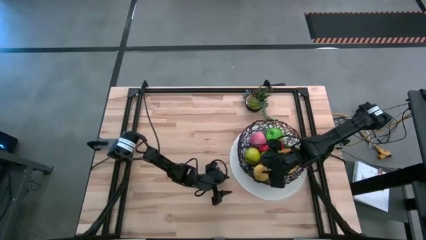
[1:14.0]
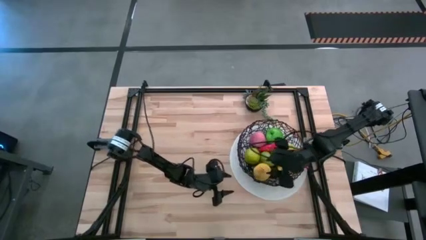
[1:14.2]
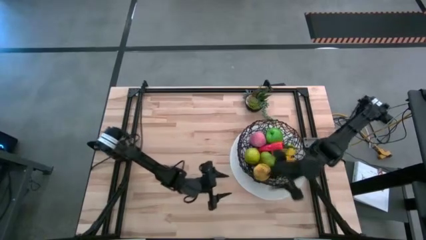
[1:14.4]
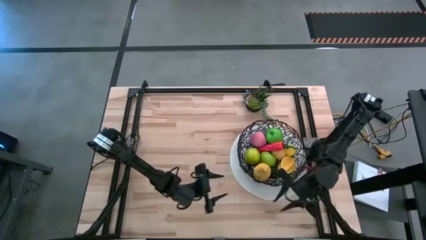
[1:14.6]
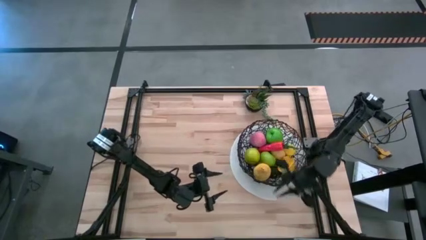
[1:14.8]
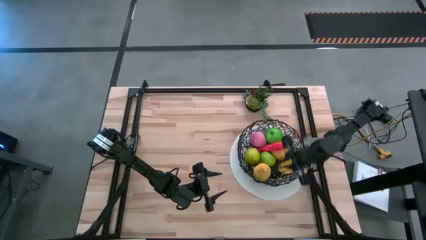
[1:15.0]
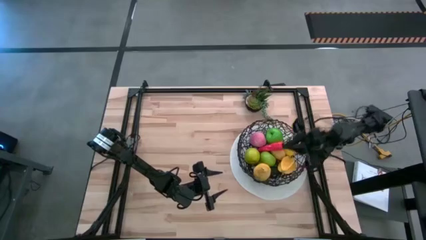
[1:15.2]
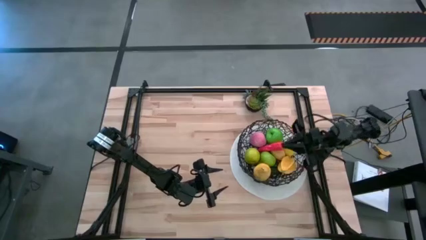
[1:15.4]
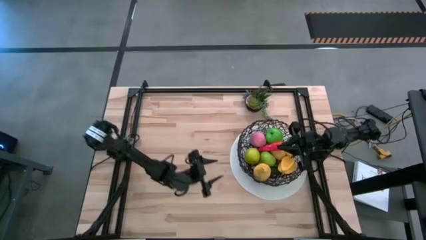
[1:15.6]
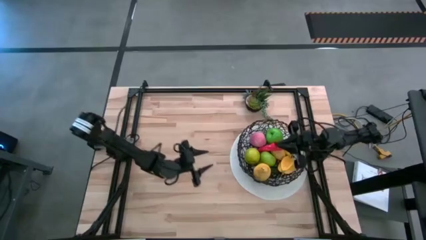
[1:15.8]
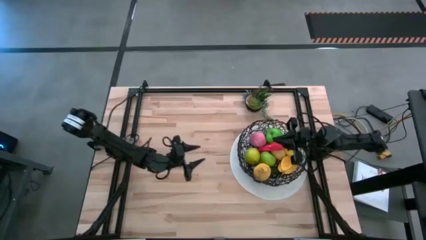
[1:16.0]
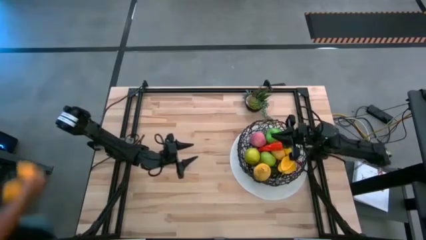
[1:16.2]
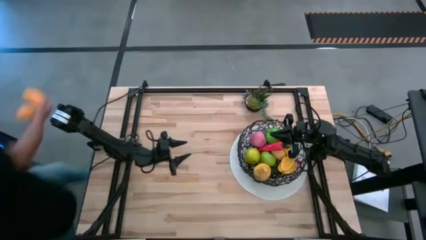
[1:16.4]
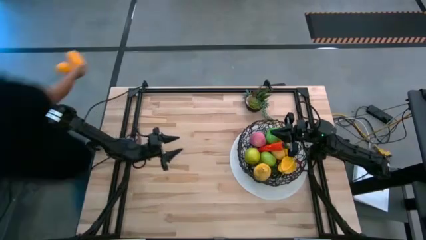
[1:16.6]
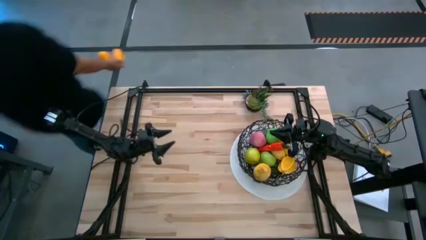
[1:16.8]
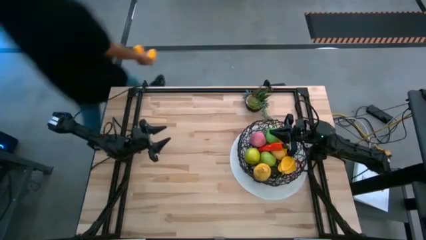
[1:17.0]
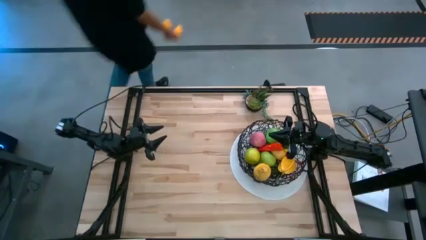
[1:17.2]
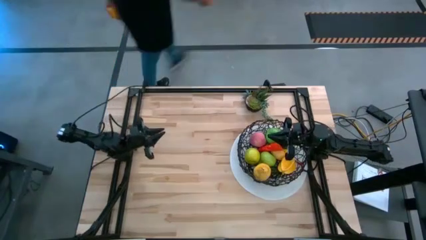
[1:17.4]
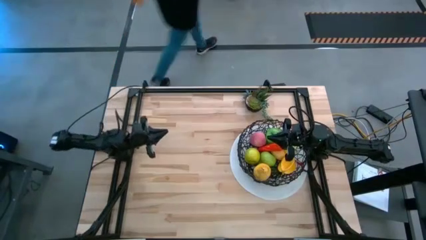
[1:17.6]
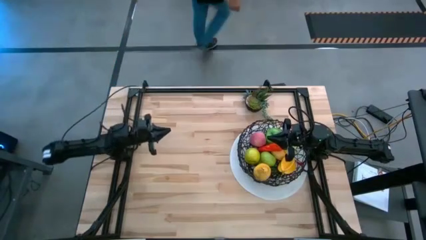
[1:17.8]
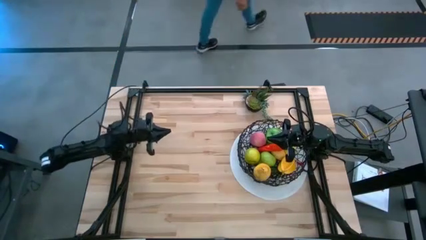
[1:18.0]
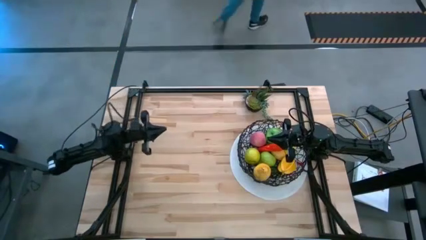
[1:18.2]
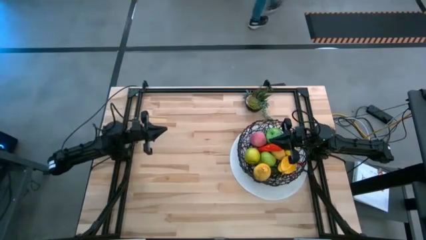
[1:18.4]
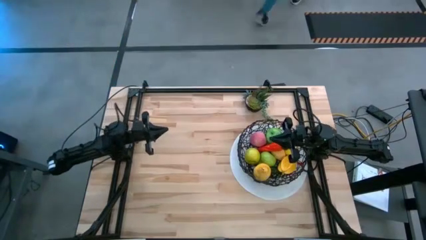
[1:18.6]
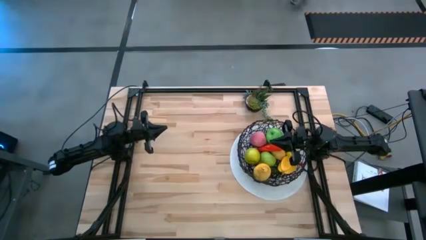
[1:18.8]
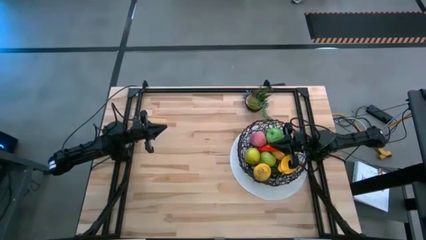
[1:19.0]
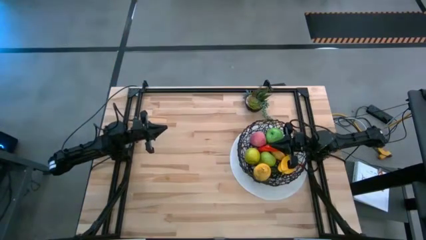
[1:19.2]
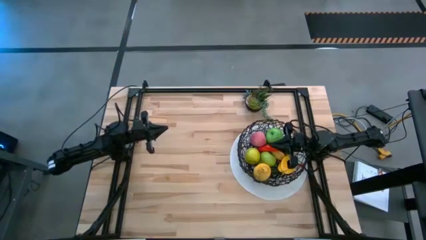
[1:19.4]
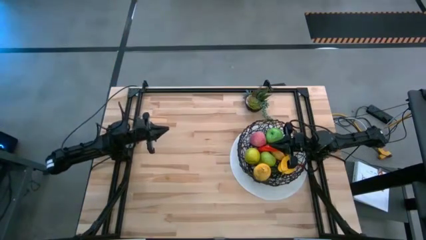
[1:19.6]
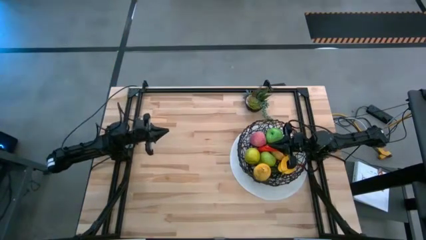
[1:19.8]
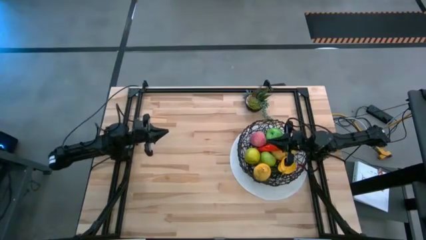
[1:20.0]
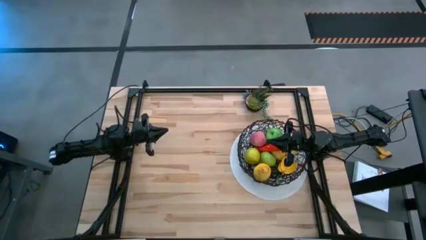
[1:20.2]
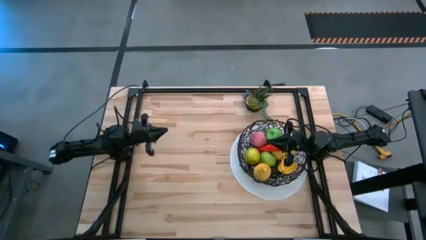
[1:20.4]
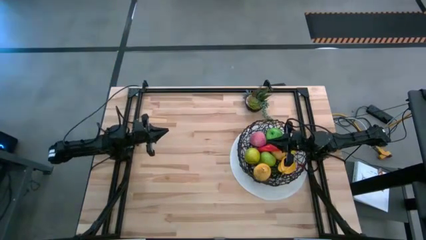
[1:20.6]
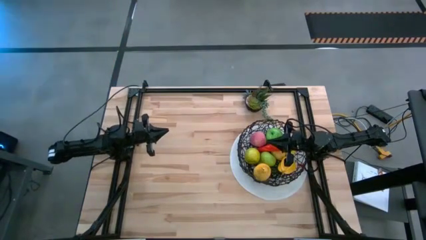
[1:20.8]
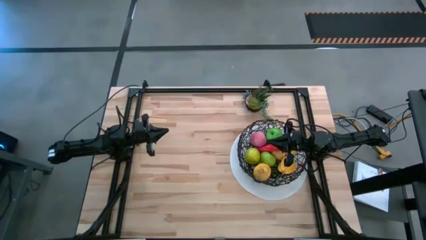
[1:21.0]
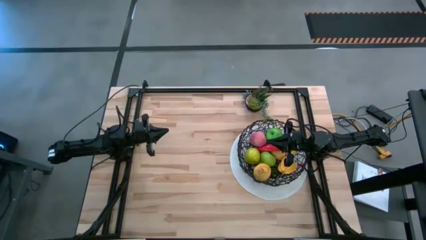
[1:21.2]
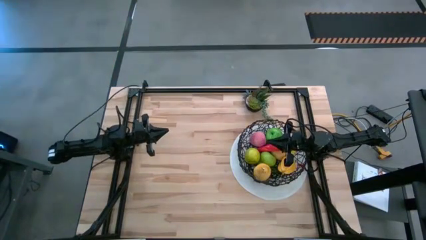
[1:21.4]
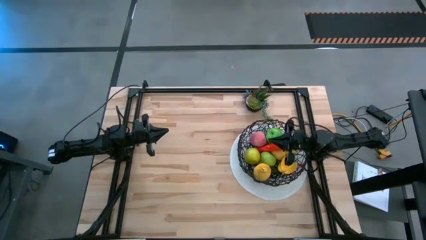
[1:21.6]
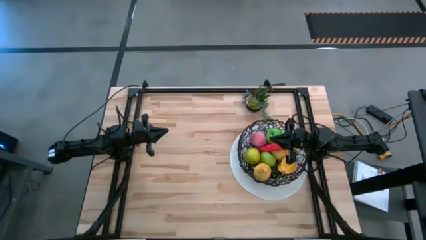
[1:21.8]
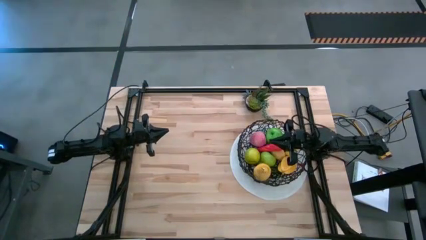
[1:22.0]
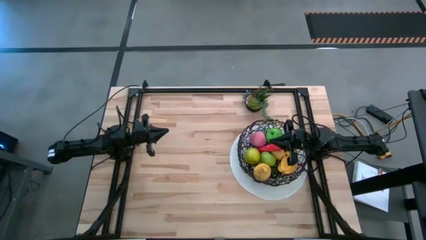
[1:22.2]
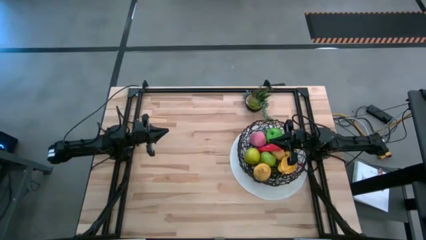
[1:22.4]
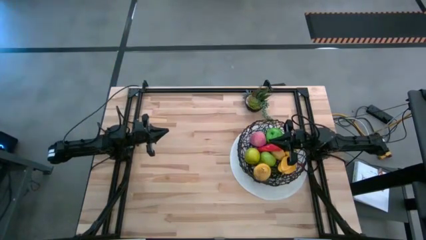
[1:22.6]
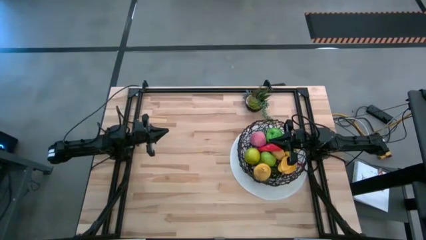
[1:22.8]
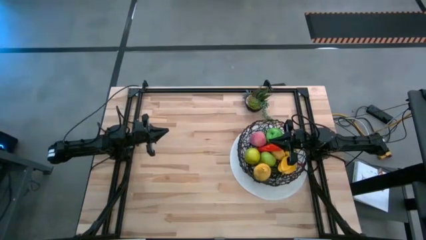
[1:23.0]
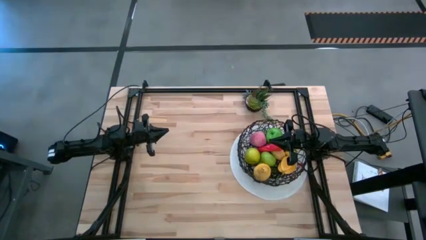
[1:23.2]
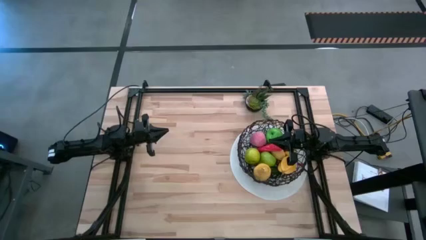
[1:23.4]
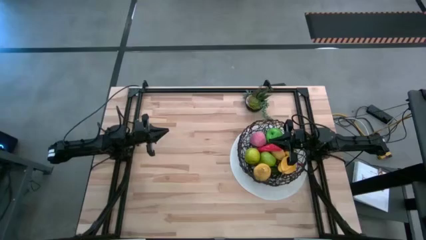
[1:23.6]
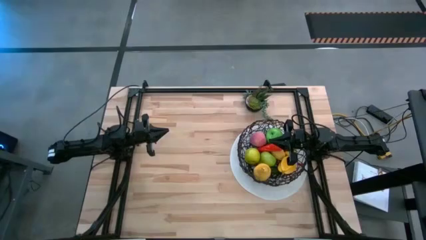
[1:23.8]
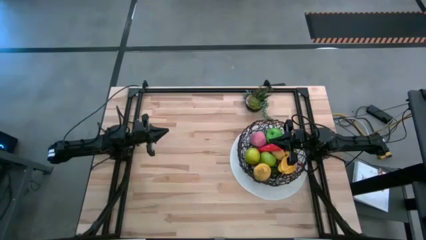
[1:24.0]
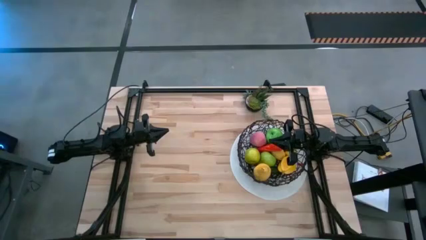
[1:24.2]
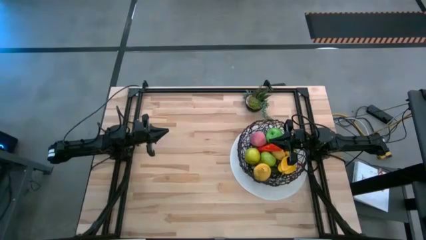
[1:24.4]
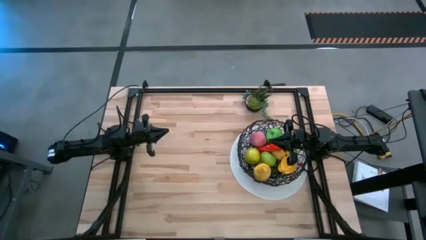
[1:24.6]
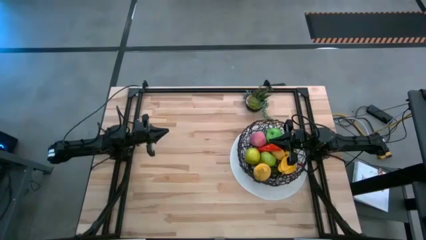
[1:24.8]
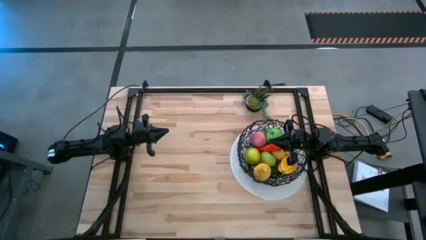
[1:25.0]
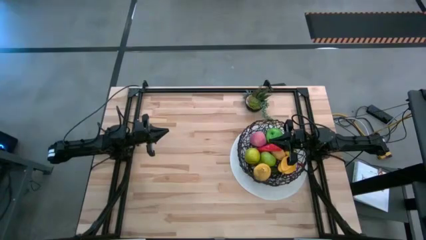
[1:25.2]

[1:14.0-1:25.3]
Task: Build produce basket
Return to Home Position

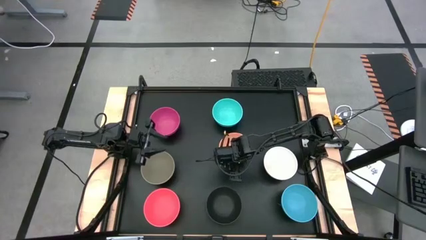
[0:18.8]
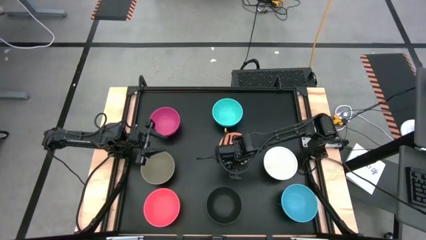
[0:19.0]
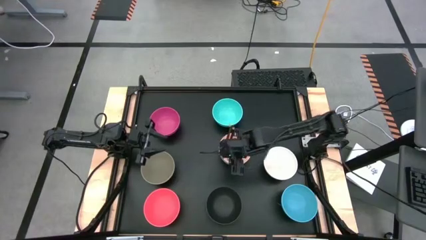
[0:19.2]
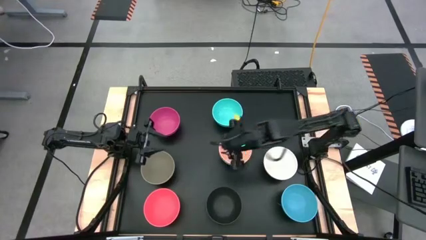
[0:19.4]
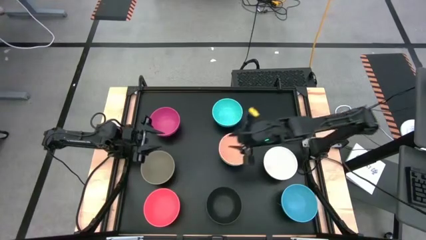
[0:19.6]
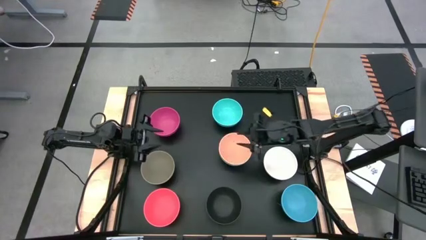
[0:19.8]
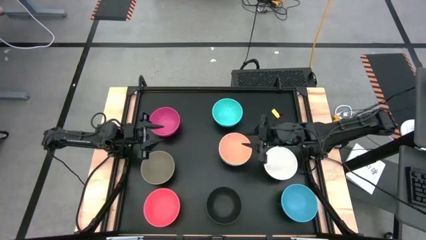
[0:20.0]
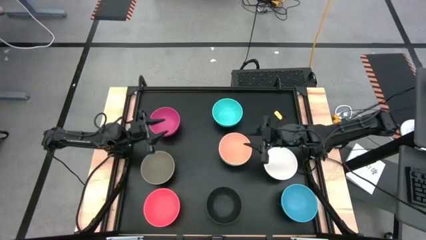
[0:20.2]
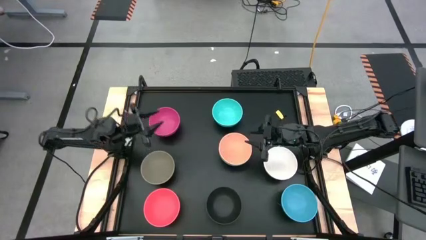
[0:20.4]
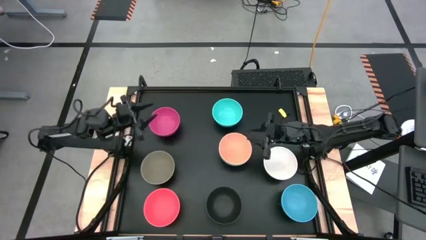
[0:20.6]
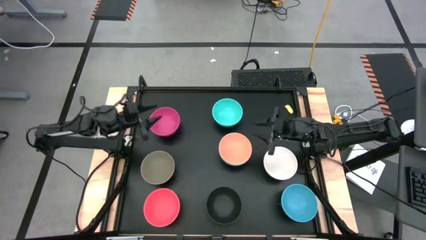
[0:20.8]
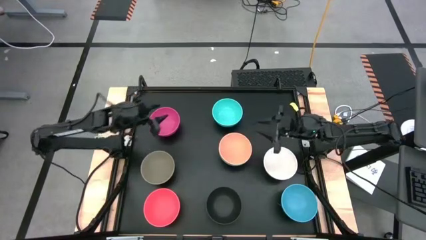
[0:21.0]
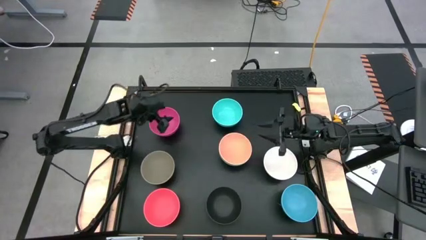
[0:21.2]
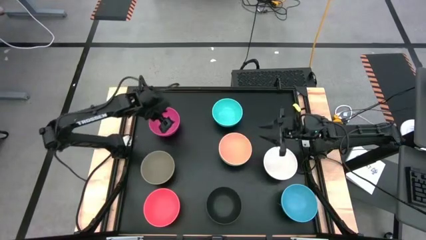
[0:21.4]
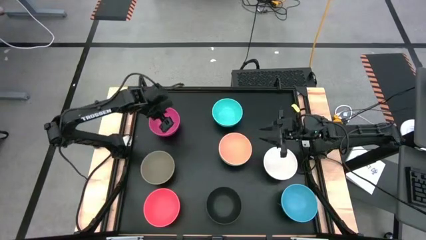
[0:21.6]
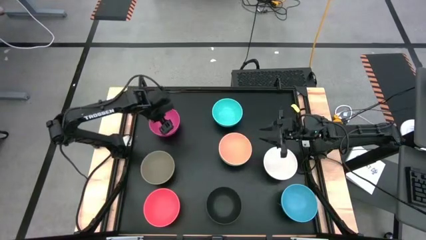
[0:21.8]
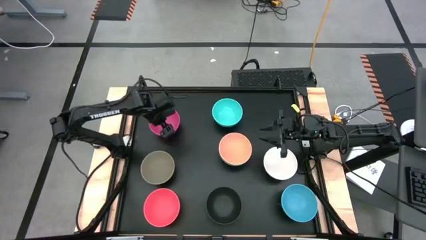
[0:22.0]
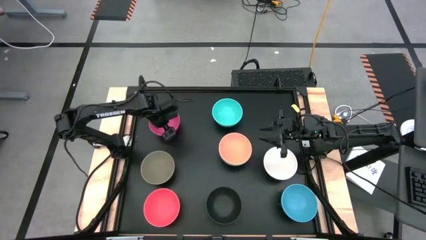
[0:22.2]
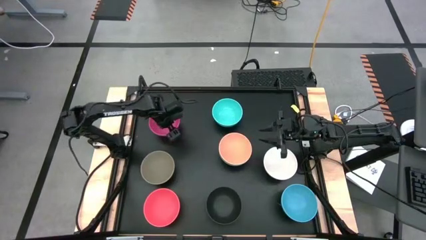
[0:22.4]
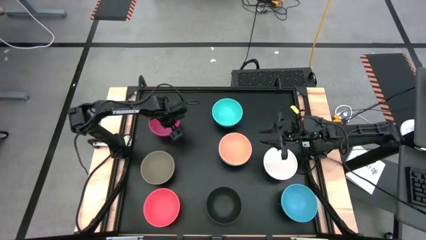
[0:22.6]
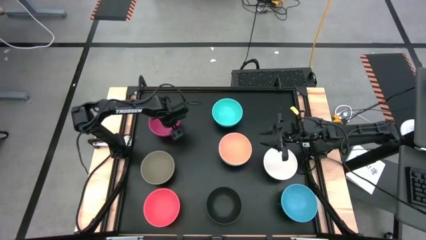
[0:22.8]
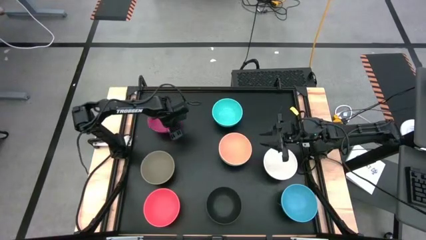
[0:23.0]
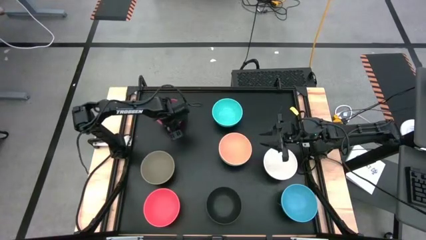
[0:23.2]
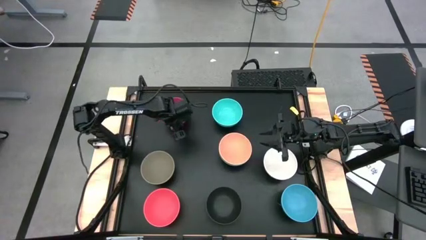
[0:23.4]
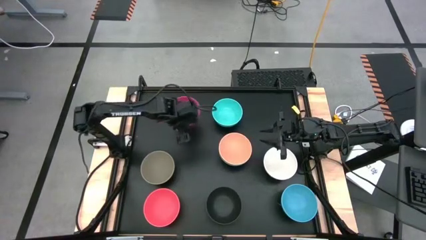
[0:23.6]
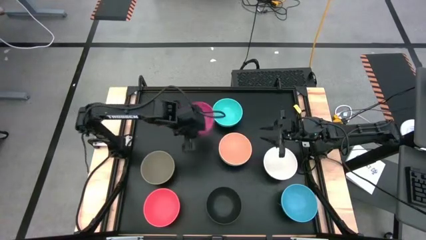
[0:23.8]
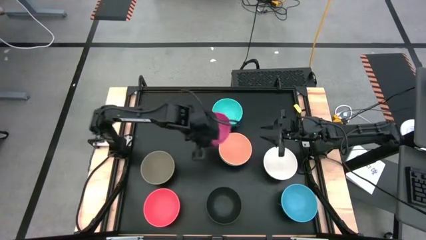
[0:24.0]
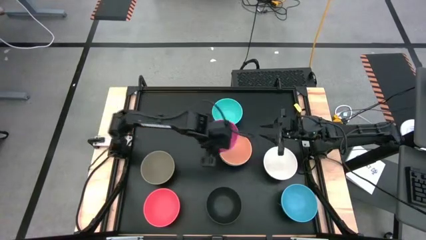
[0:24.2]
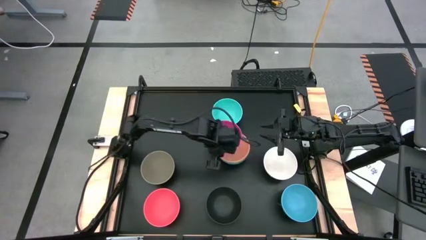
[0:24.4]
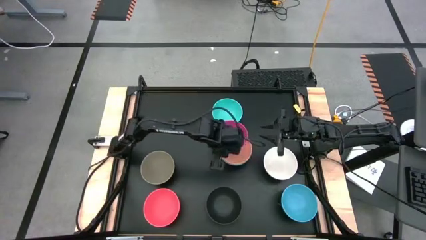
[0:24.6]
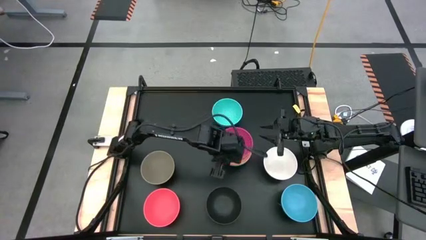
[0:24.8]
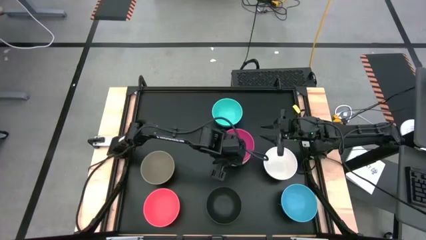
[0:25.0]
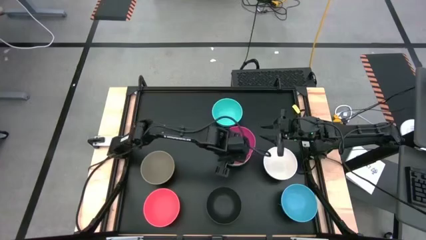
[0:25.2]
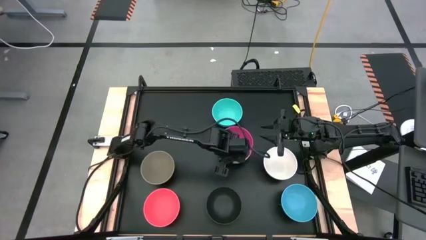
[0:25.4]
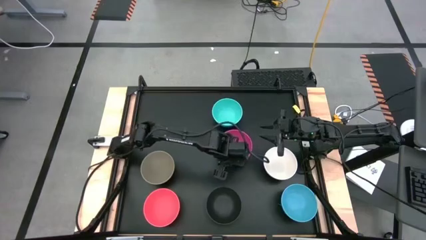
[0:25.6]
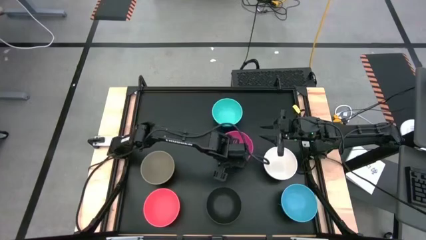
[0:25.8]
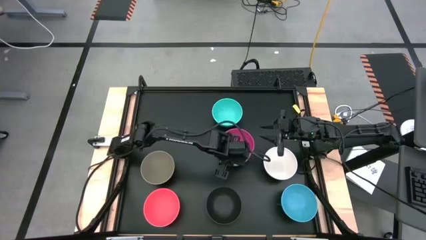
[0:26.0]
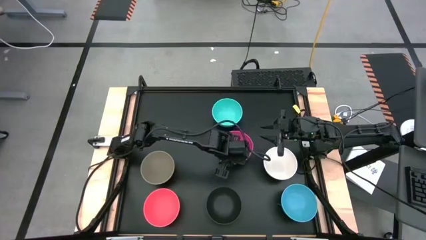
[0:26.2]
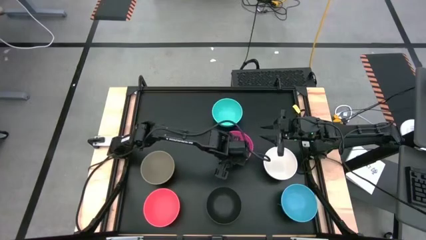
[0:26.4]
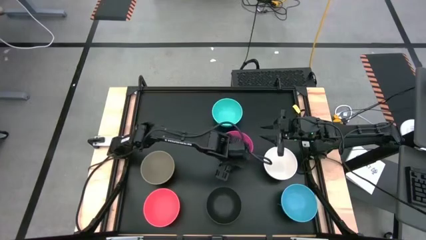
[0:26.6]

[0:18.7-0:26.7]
Task: Nest bowls inside each other
Stack the pink bowl on top of the light orange bowl
